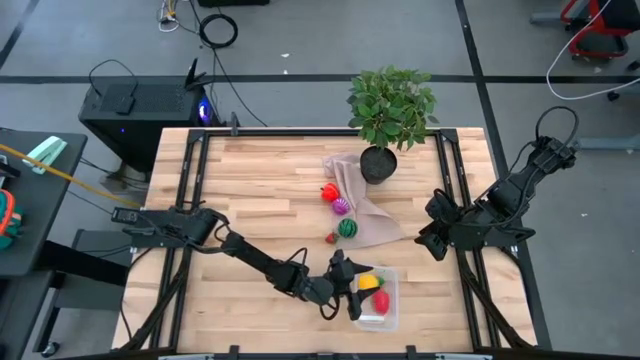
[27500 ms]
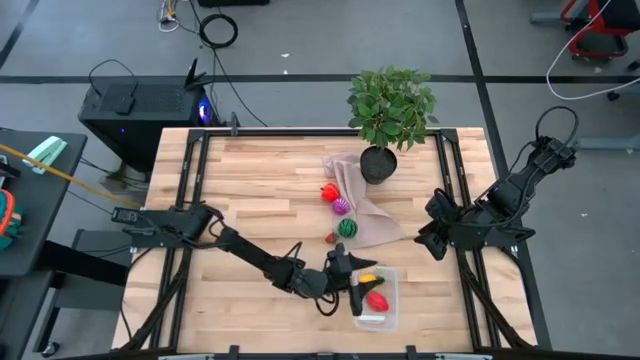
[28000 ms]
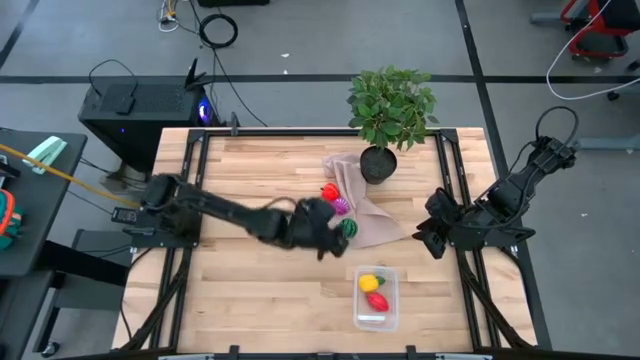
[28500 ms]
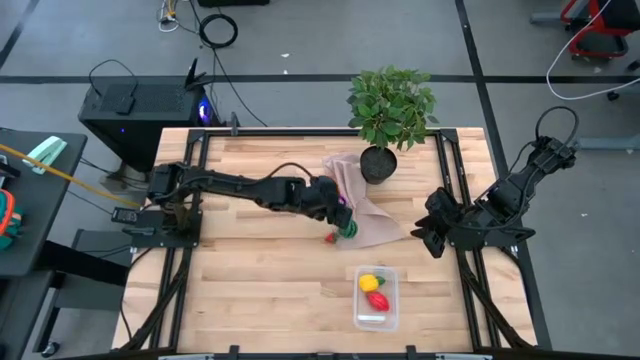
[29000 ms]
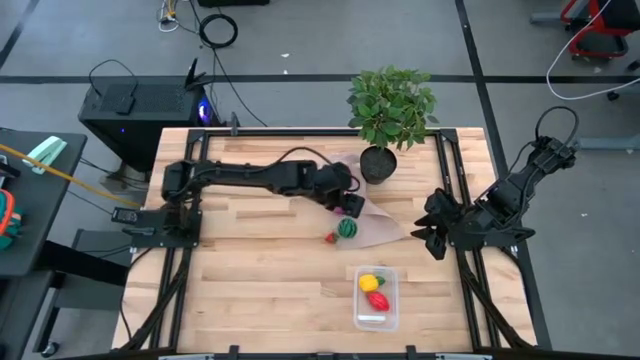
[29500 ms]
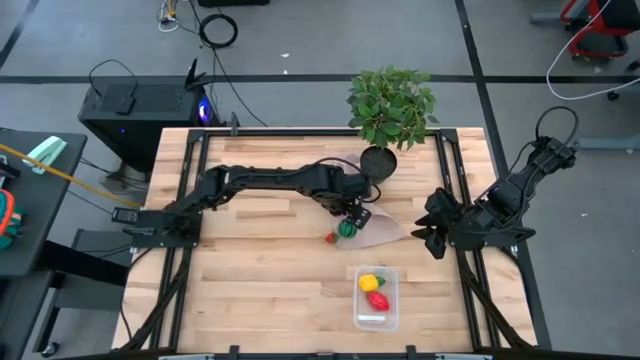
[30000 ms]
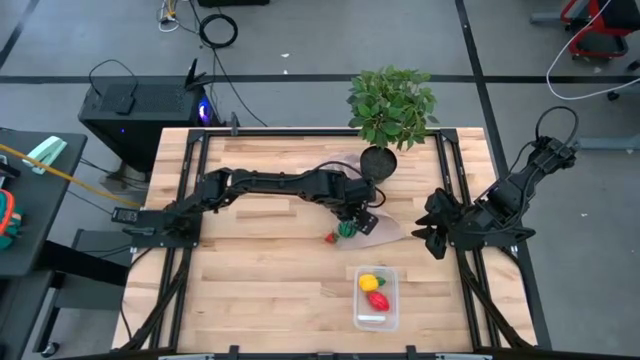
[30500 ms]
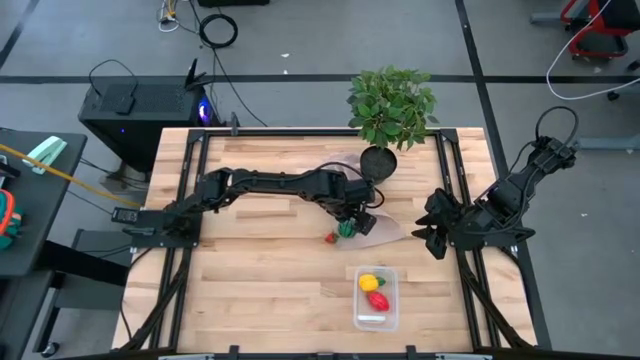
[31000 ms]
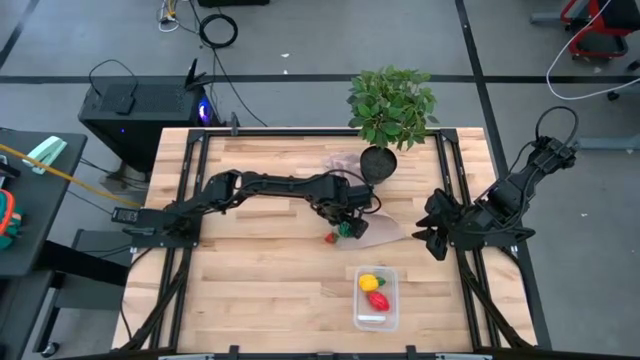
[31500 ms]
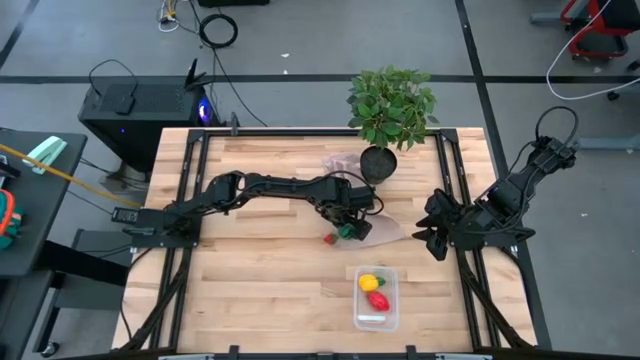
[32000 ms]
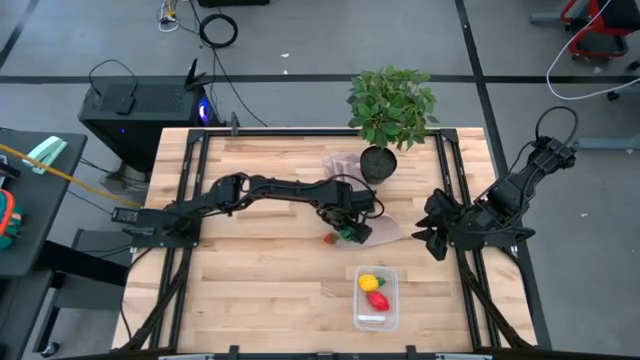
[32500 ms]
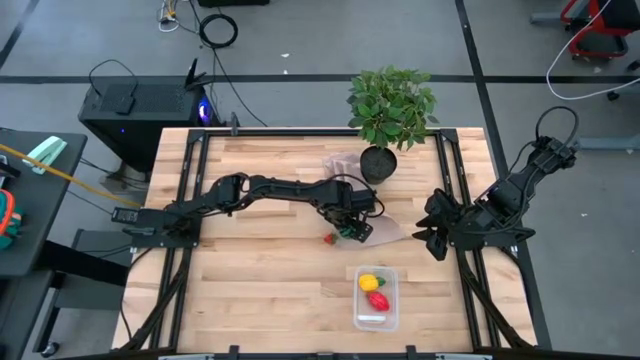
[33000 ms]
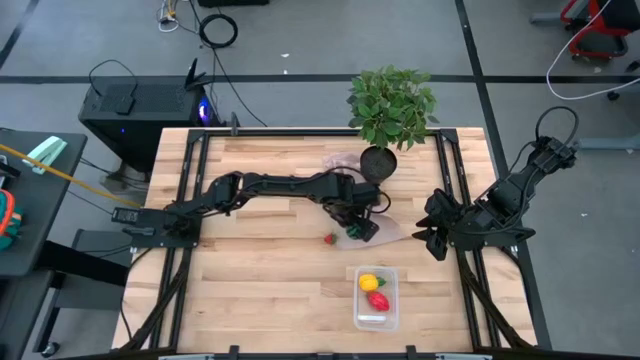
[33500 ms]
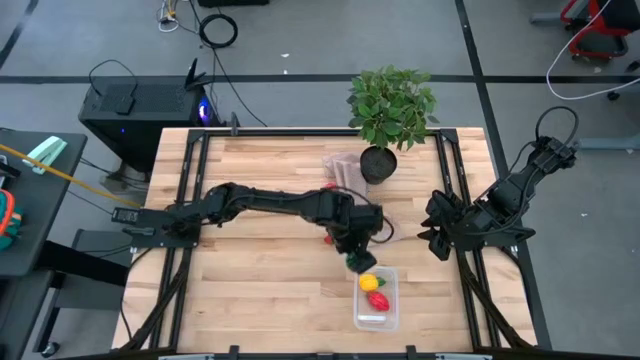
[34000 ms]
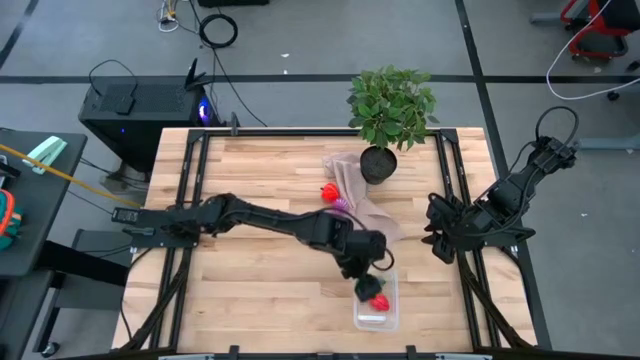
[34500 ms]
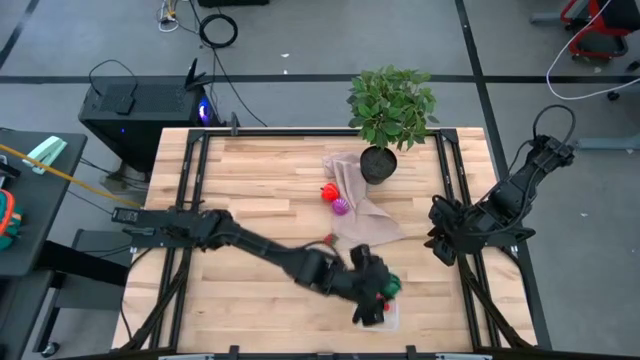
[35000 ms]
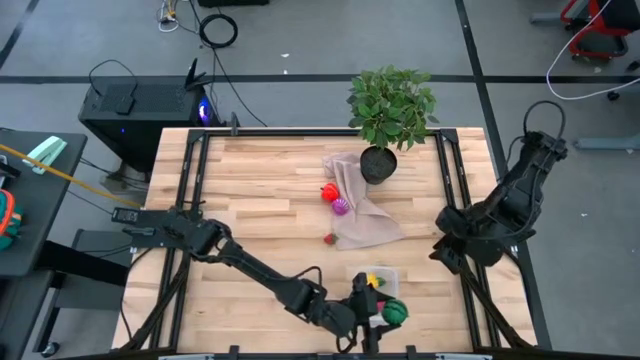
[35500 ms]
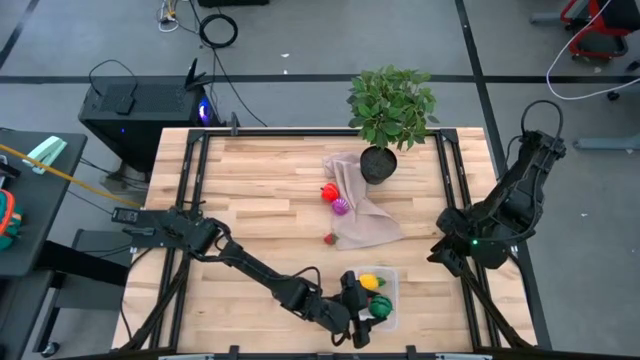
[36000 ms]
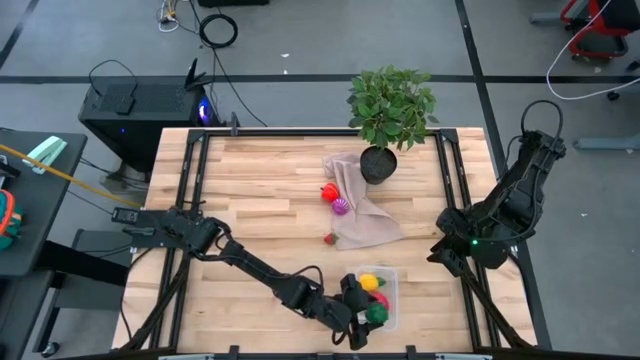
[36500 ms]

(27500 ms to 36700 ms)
Task: Pick and placing Produce into tupperware
Put the green watermelon into the transparent bin

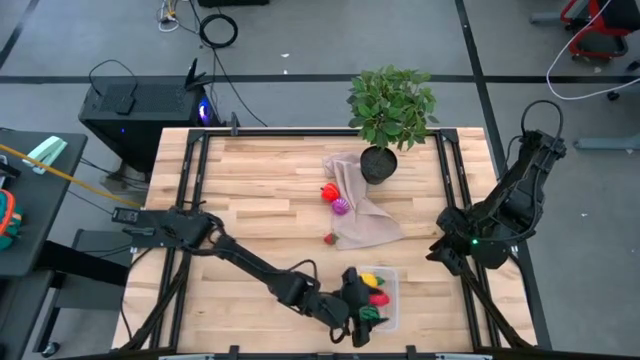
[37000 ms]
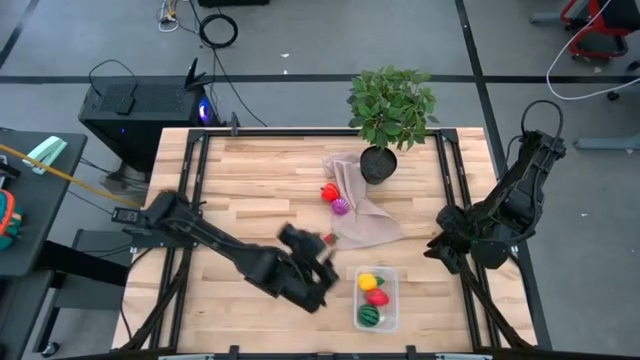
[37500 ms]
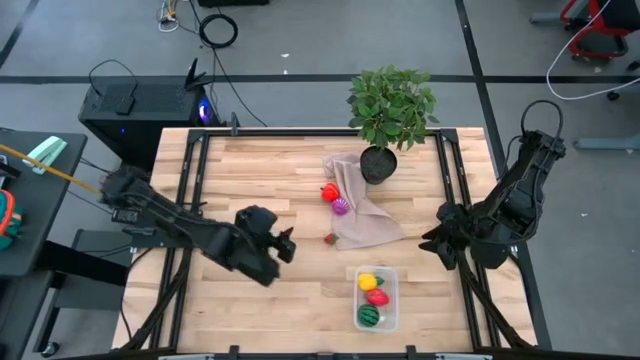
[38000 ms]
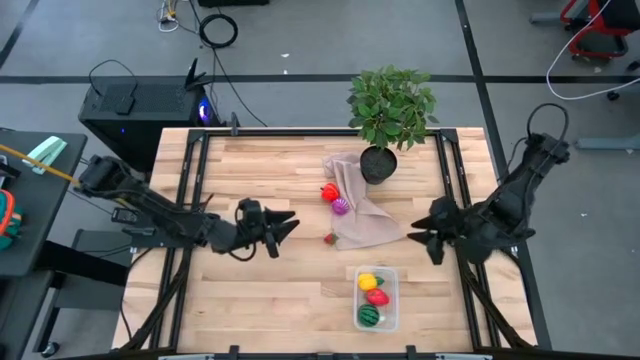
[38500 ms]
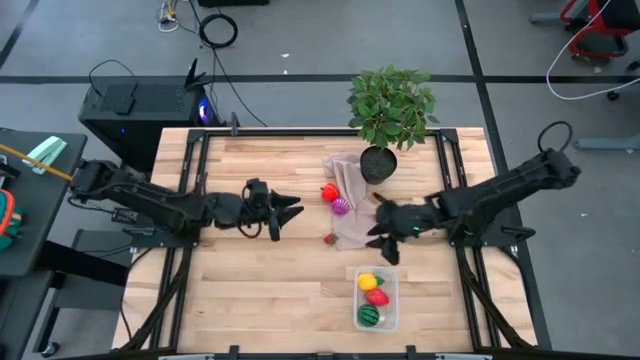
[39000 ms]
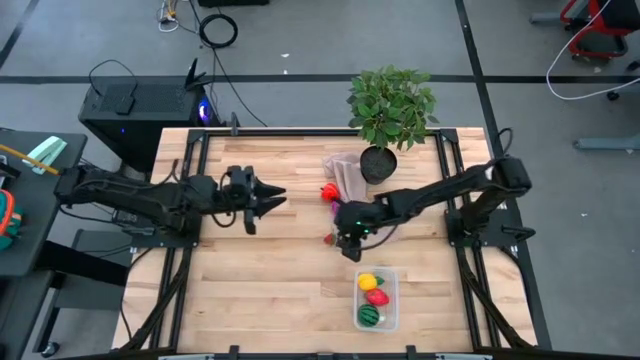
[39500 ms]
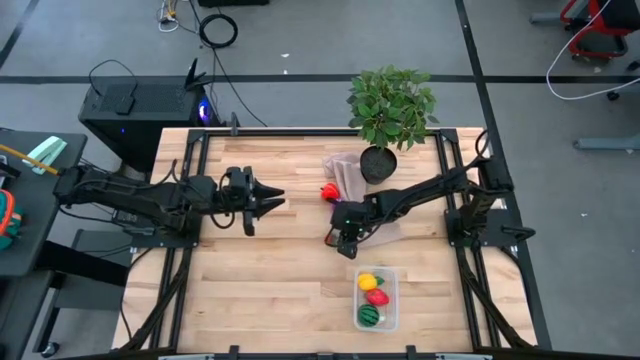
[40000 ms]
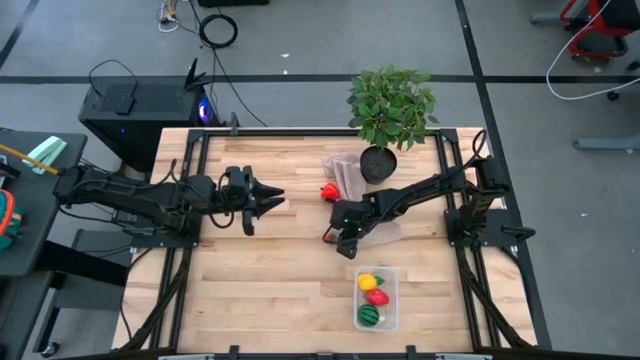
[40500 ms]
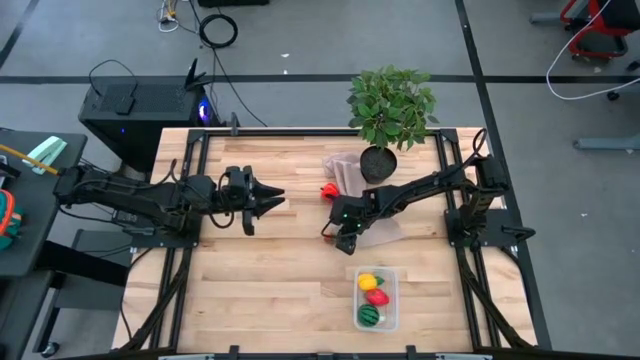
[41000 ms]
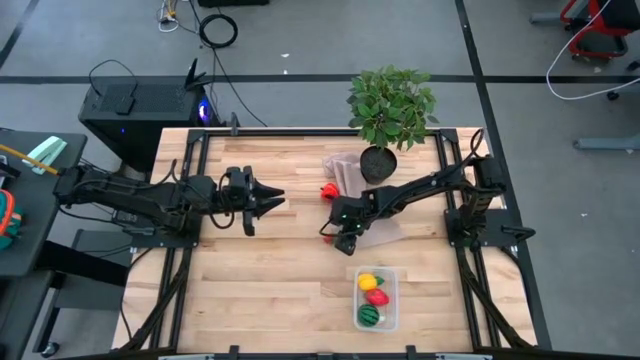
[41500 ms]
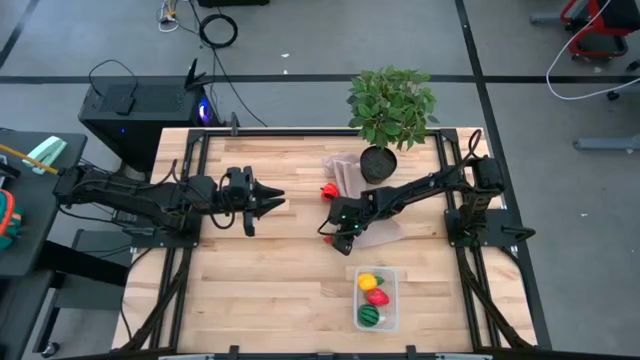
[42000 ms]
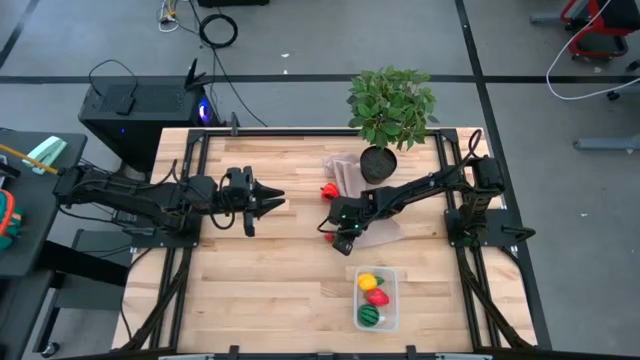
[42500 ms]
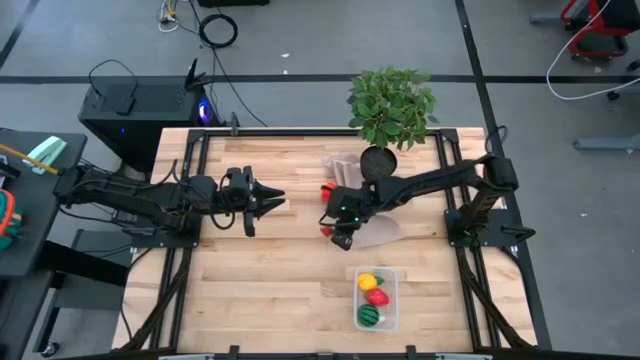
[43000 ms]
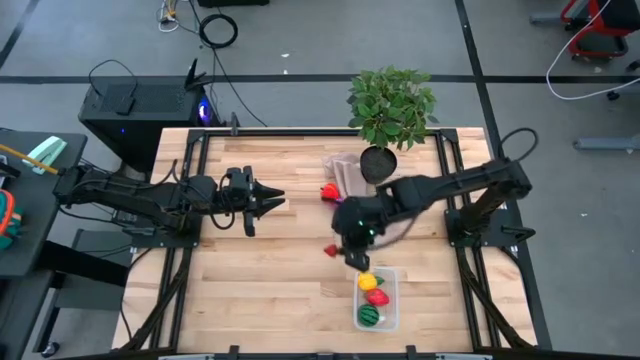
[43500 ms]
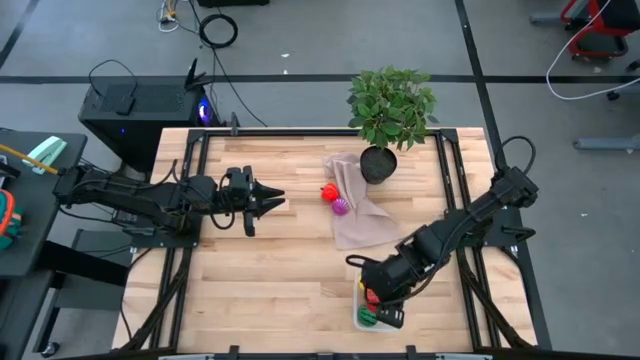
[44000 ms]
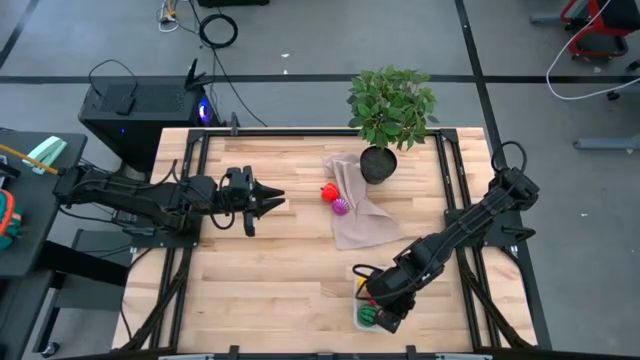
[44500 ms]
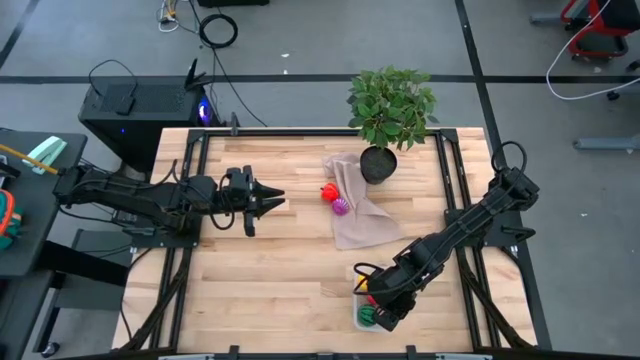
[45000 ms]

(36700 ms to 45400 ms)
Put the red strawberry into the transparent bin

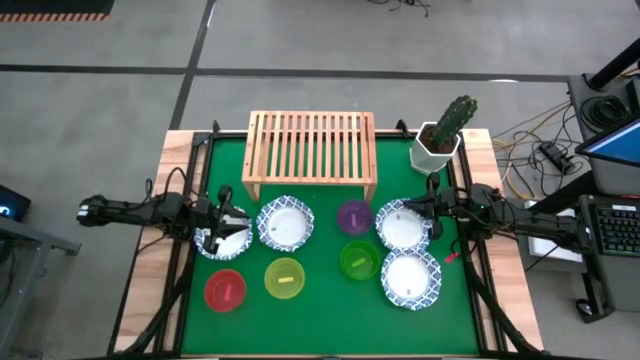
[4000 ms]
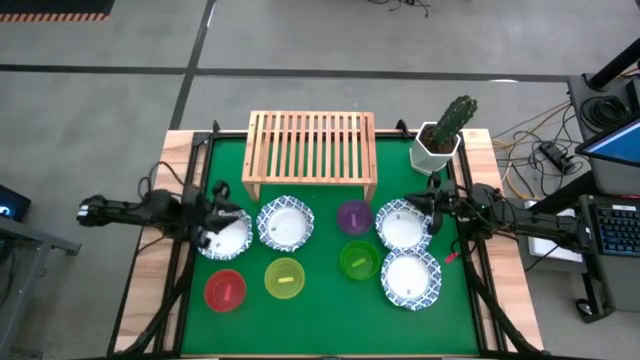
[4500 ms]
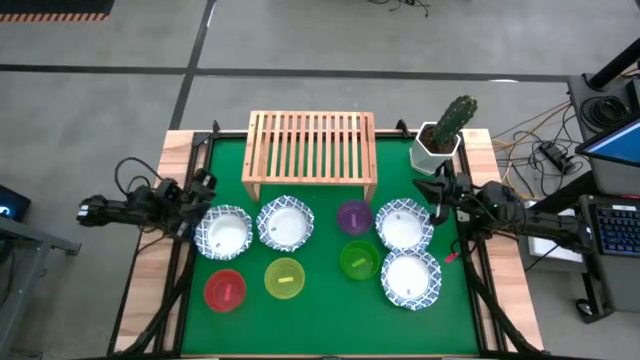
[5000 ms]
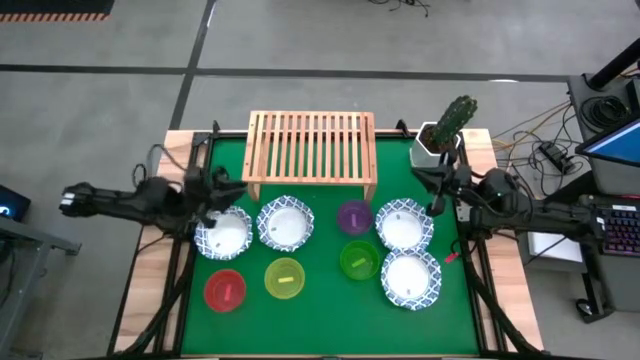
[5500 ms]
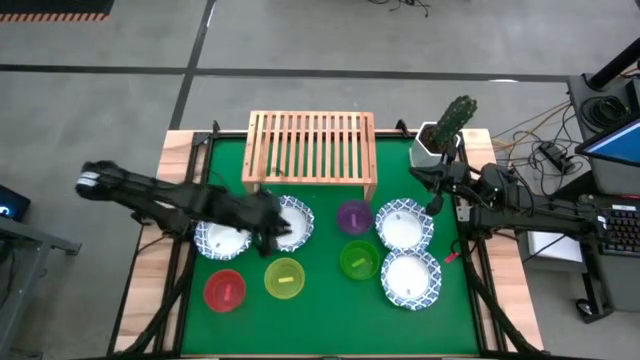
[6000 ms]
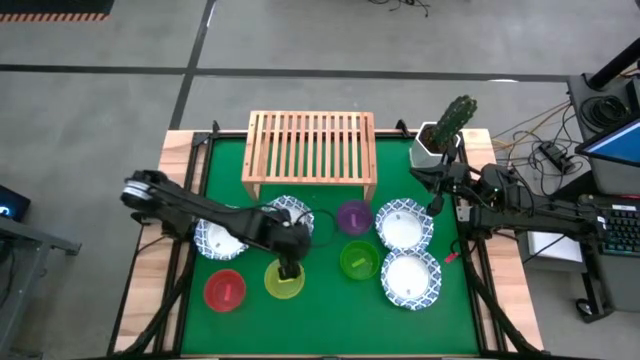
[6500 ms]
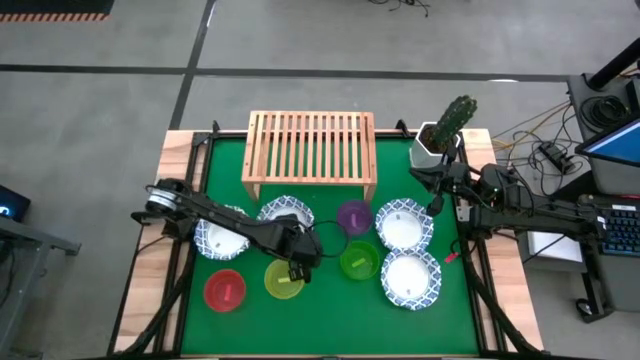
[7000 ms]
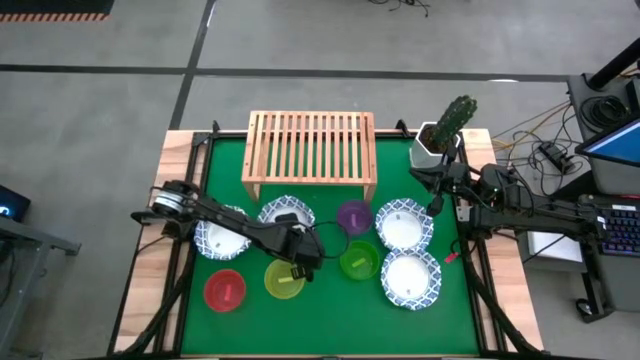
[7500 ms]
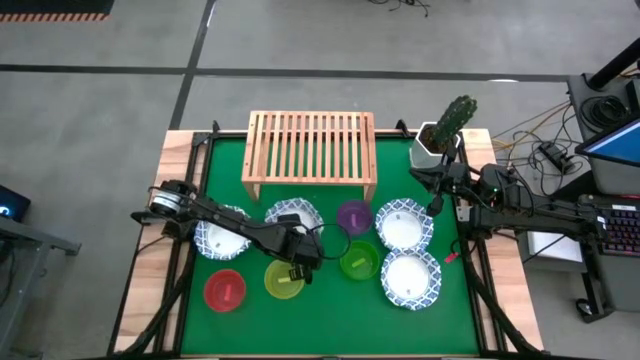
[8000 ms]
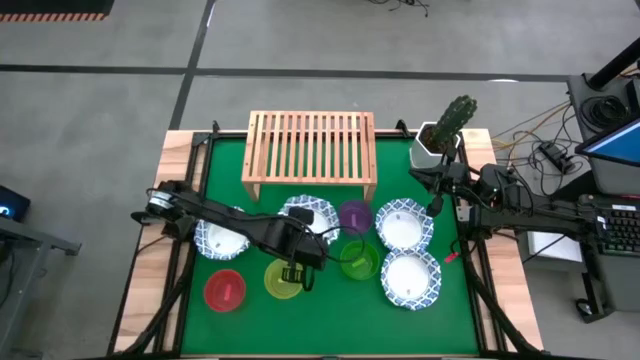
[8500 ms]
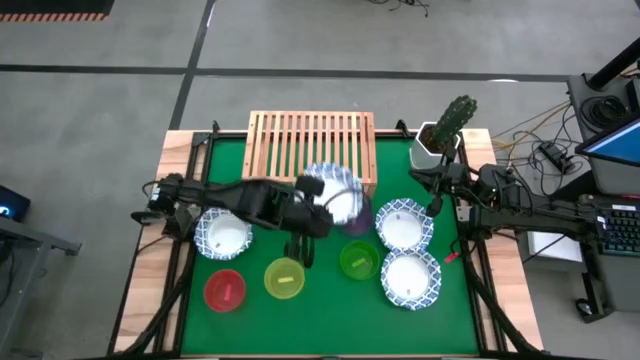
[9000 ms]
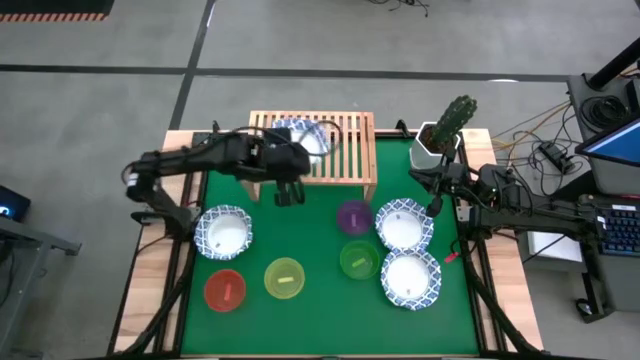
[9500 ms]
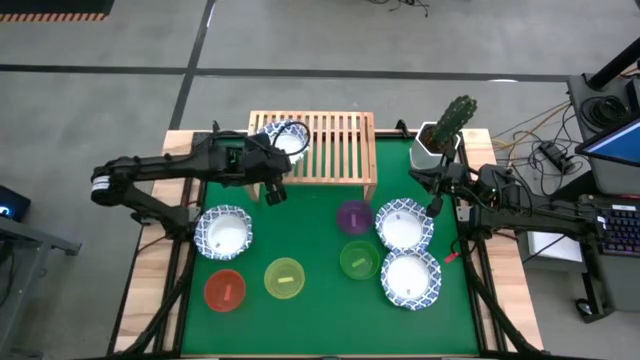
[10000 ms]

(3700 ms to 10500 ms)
Task: Place and stack bowls onto a shelf
Put the blue patterned bowl on the shelf
